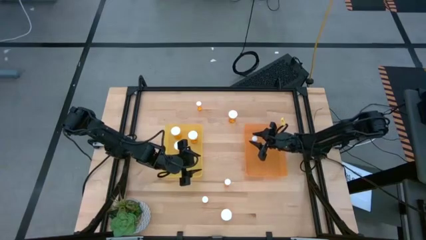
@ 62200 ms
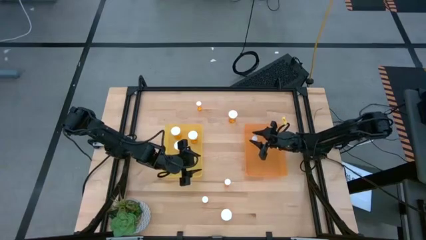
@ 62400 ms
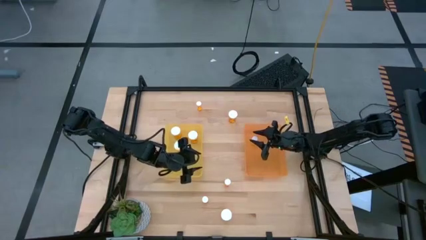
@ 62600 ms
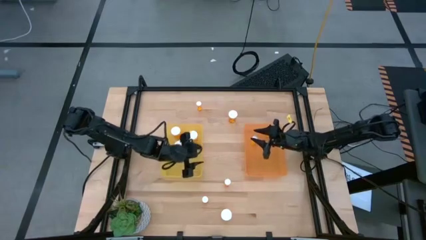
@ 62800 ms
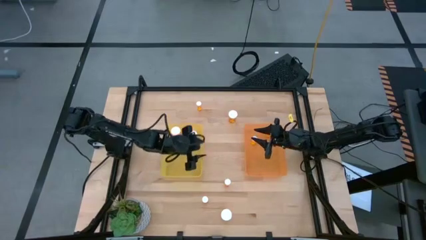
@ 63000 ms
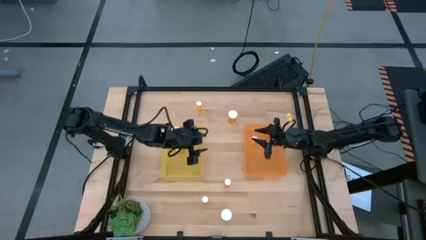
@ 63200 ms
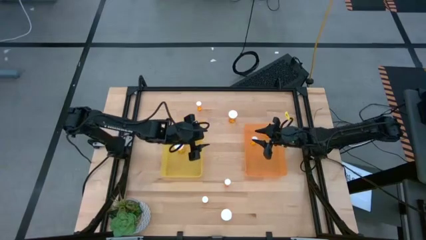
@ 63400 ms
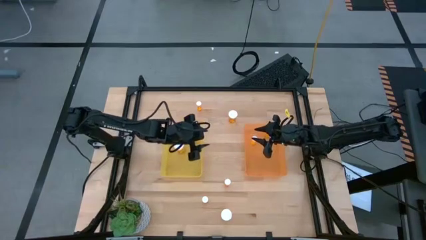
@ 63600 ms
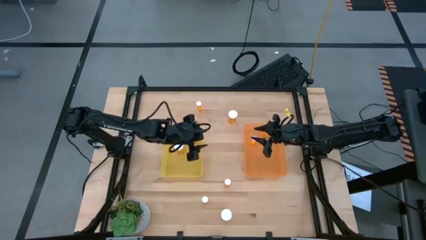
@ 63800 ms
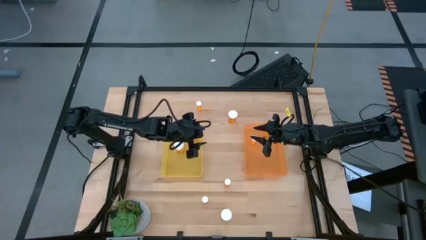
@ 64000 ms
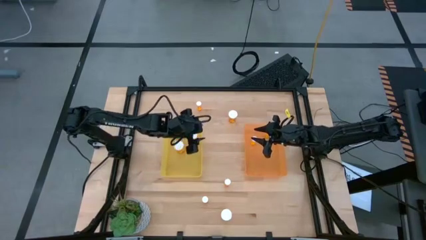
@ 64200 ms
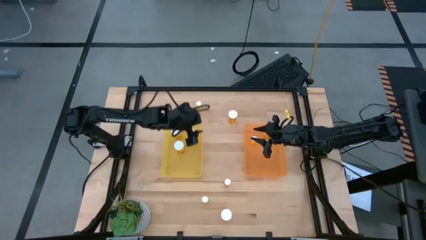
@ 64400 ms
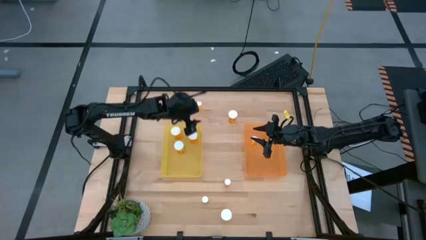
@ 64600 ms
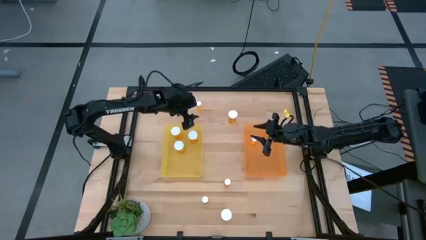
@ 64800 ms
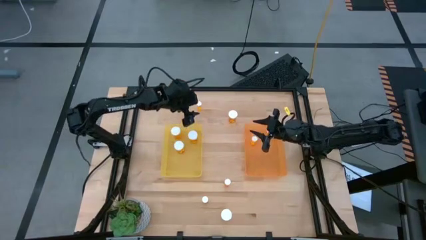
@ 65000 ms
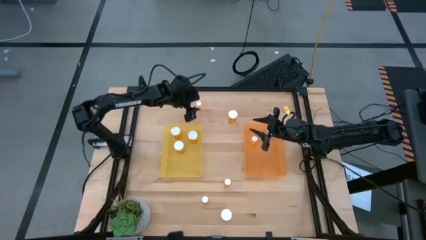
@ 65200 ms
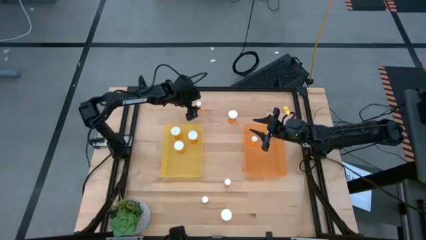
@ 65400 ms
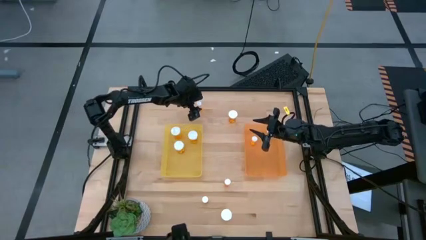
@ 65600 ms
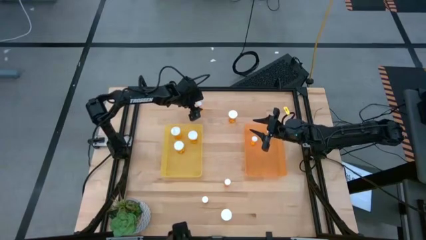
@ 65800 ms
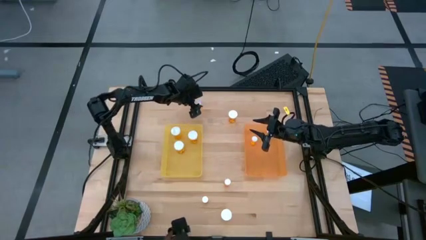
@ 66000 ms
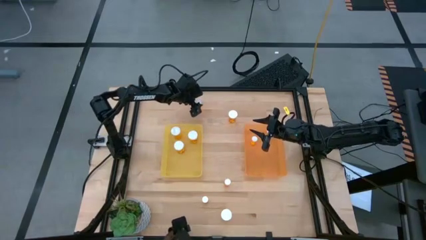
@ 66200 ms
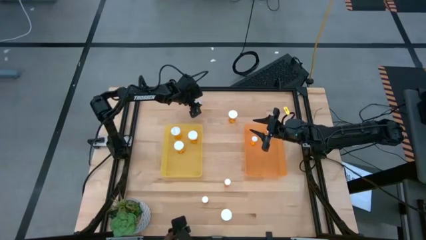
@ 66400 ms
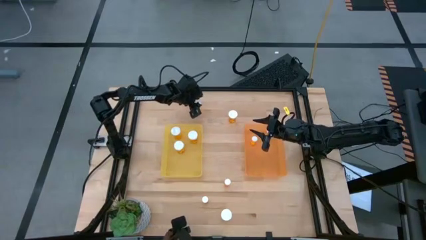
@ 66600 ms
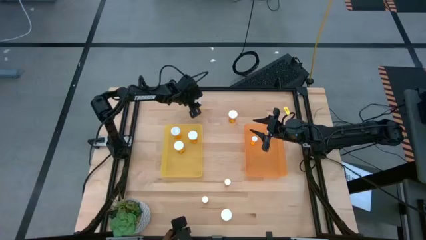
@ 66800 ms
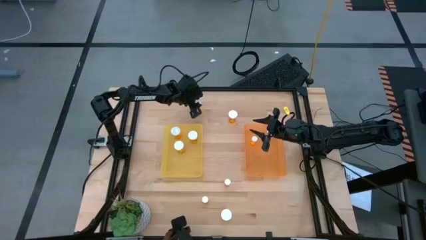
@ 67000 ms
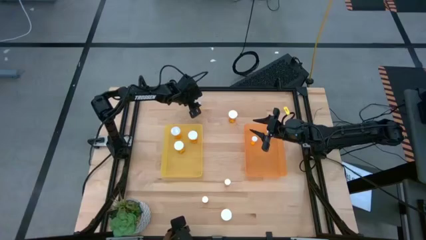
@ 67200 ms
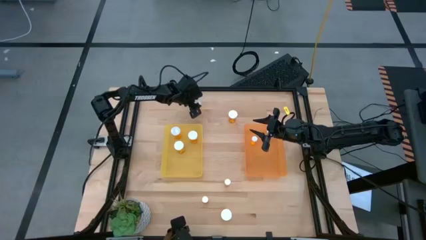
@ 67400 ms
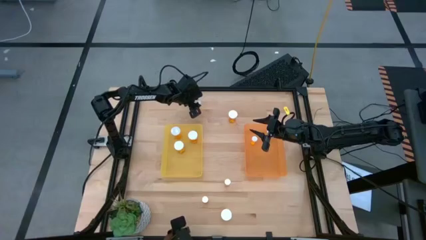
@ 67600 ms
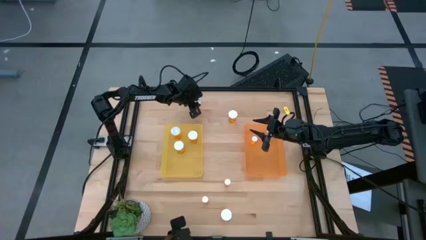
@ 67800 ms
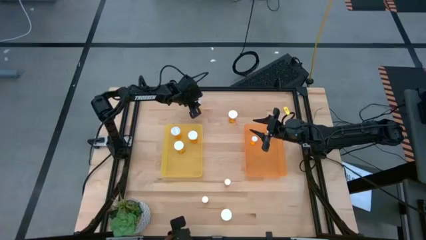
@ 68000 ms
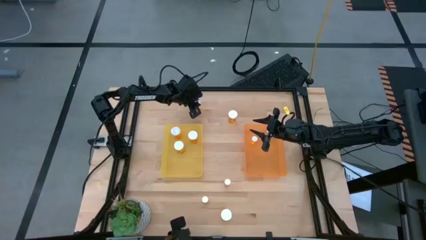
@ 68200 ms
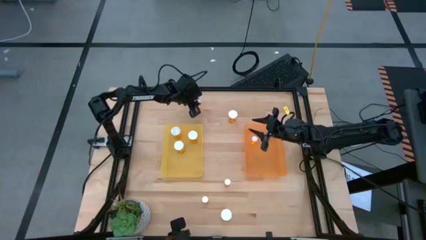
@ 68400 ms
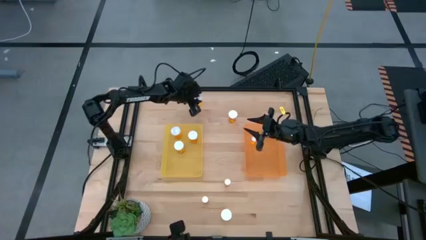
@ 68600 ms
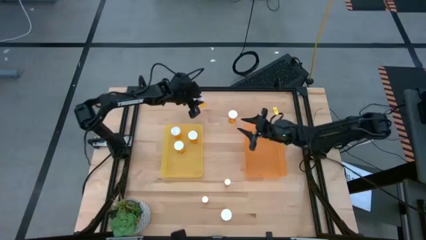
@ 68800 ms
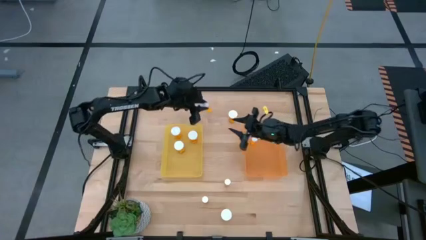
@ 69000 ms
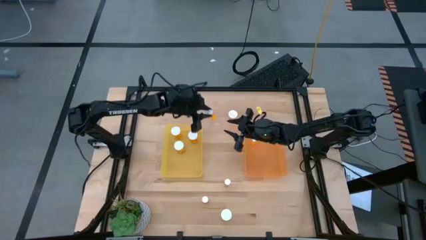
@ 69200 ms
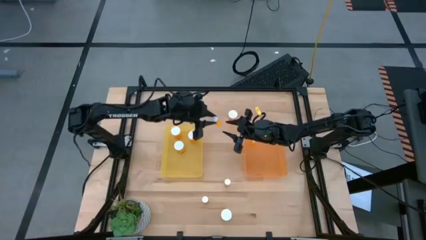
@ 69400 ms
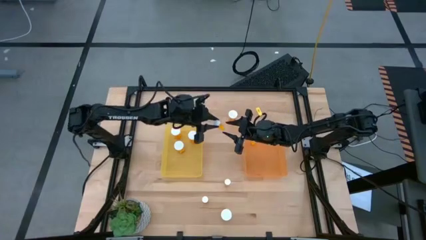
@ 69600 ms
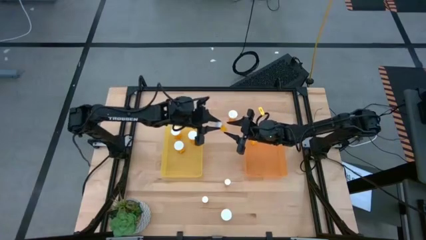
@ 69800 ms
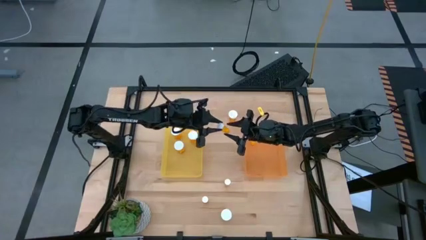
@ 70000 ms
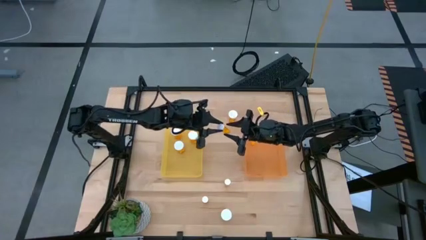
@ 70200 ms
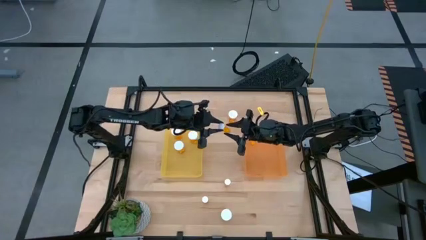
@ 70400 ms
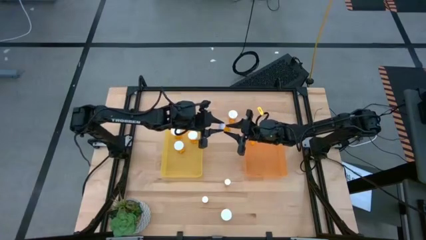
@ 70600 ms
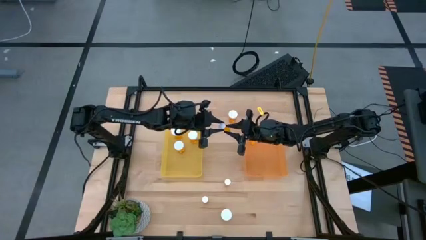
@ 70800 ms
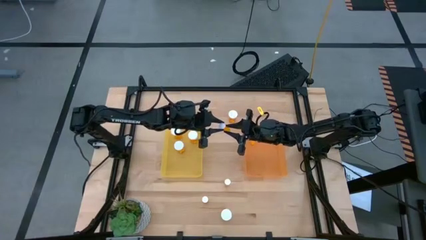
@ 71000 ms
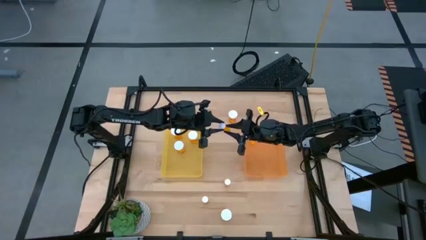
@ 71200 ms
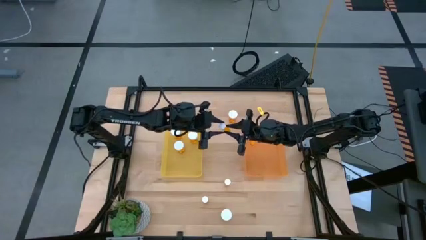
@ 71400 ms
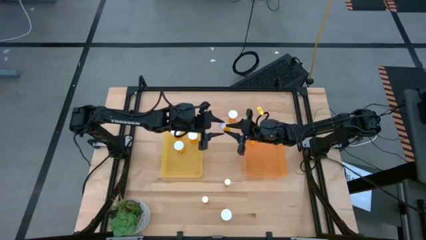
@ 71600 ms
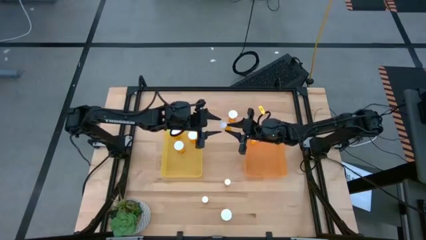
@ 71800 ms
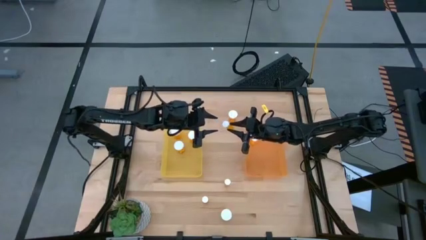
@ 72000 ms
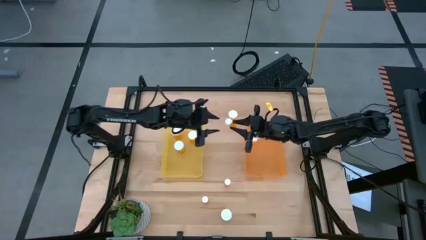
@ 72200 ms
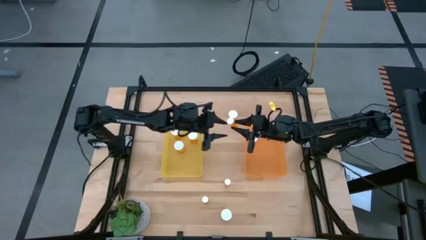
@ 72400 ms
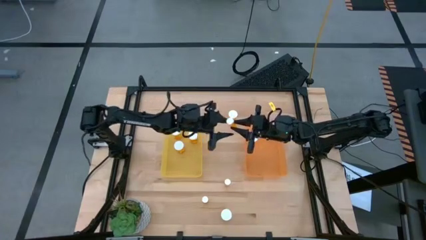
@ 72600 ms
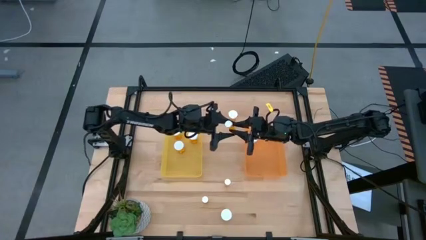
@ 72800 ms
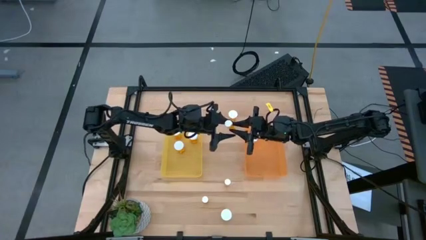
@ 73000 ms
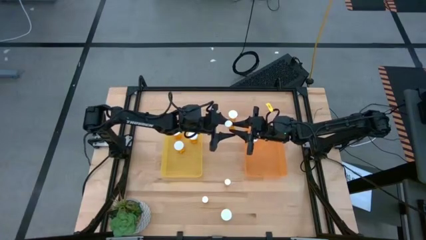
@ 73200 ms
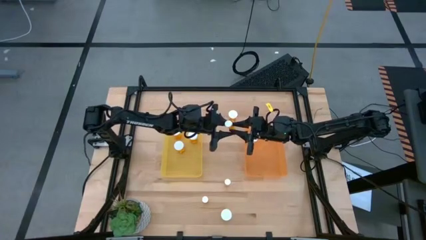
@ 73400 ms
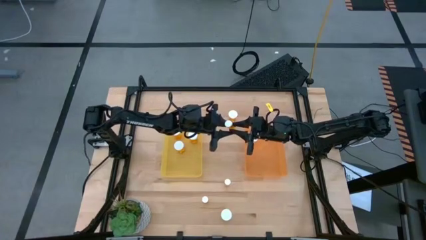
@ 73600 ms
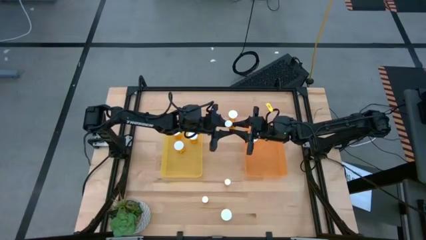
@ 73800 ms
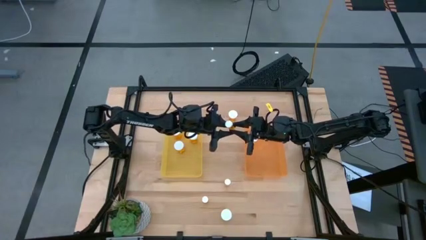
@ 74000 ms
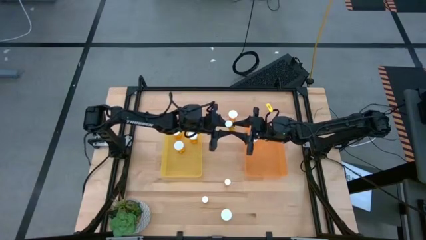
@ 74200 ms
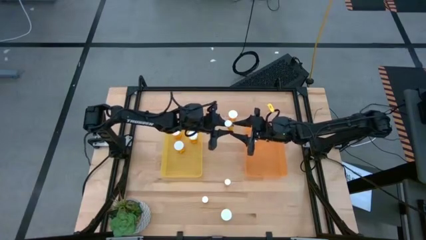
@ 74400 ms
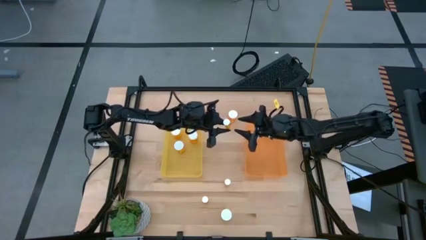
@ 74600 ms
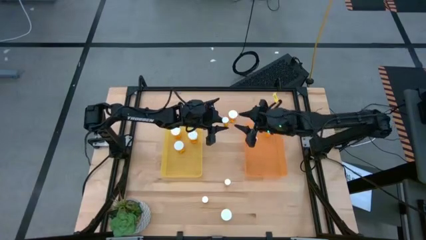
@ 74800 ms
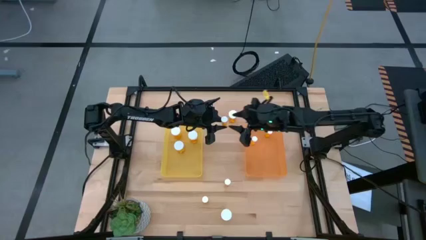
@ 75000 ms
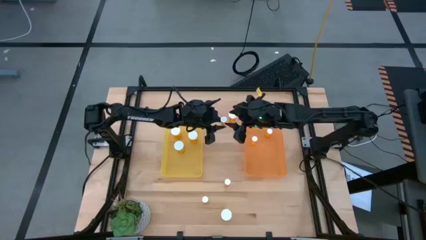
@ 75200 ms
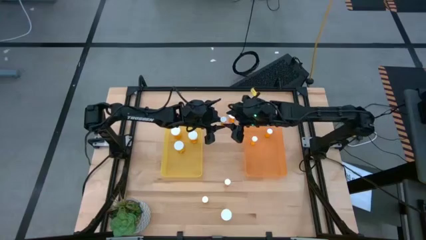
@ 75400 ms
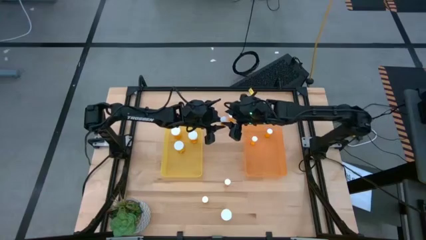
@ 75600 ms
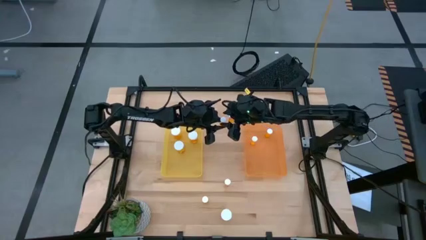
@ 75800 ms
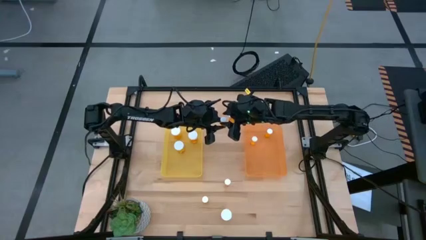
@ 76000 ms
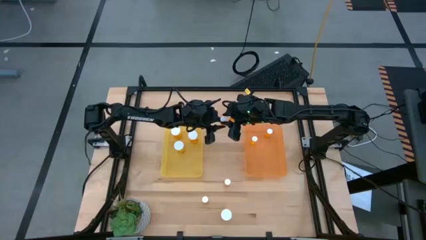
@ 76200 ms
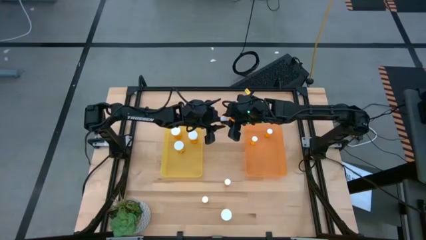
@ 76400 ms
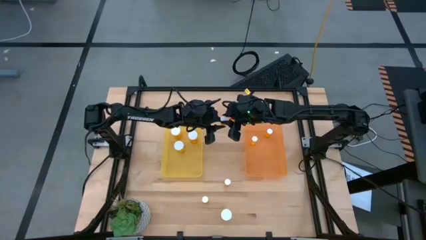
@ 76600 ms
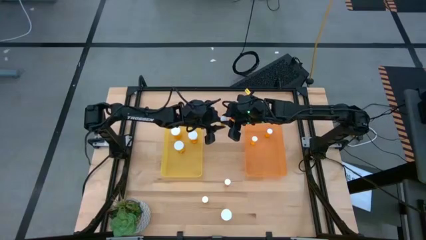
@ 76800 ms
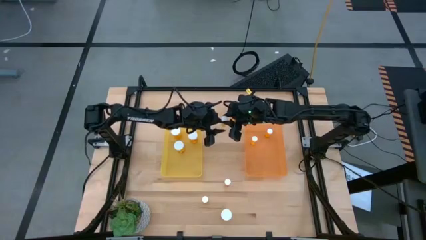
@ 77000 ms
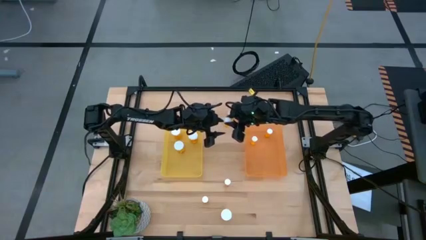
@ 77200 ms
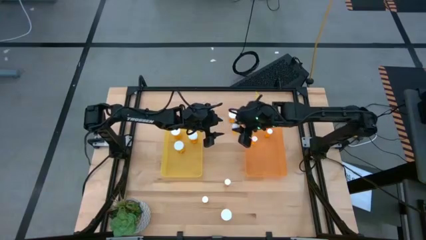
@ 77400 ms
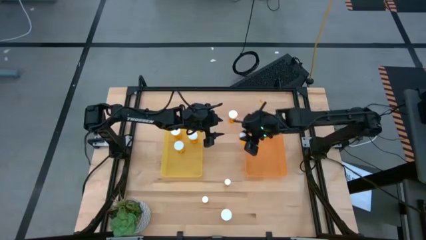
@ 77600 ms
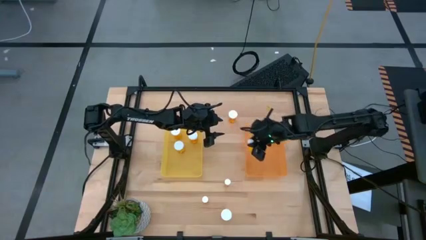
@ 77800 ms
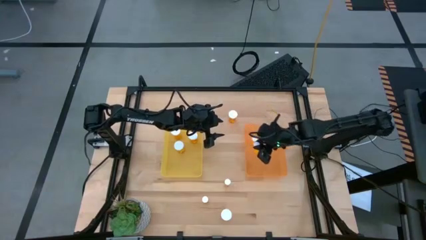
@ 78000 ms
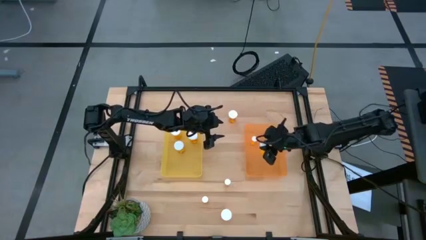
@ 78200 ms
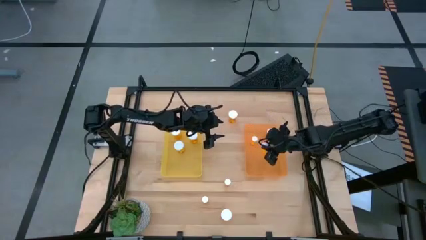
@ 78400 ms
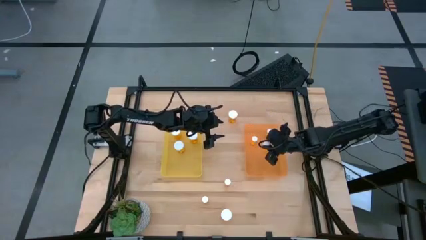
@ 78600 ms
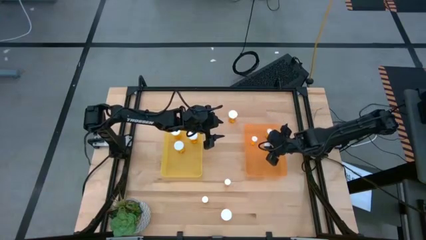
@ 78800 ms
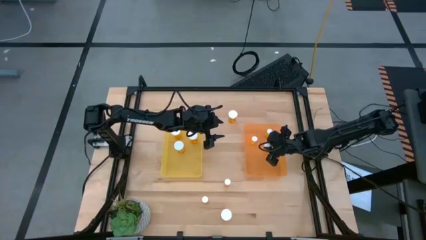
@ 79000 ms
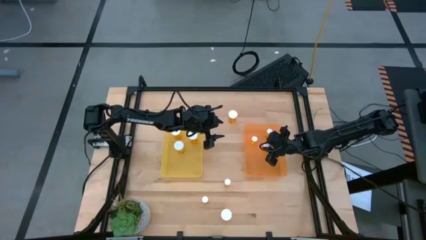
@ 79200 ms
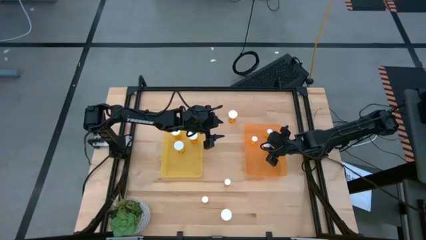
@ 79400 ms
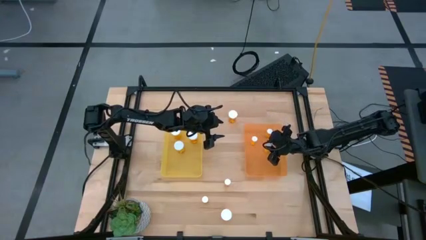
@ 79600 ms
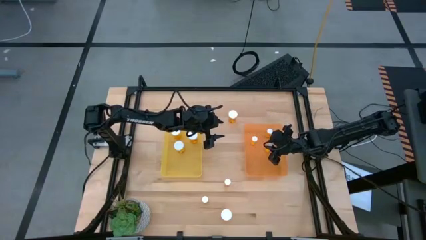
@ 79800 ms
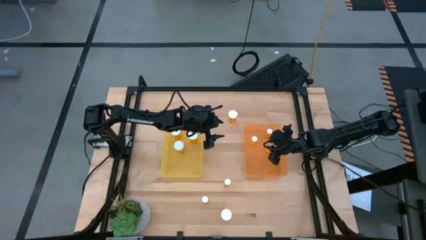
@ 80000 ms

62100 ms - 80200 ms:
Task: Pick and place medicine bottles into bin by pill shape (circle, oval)
Put the small orange pill bottle into the orange bin
